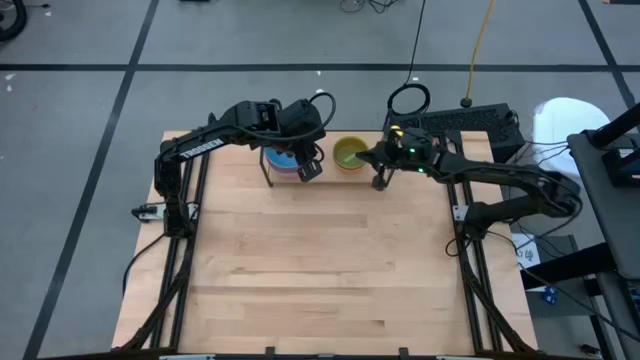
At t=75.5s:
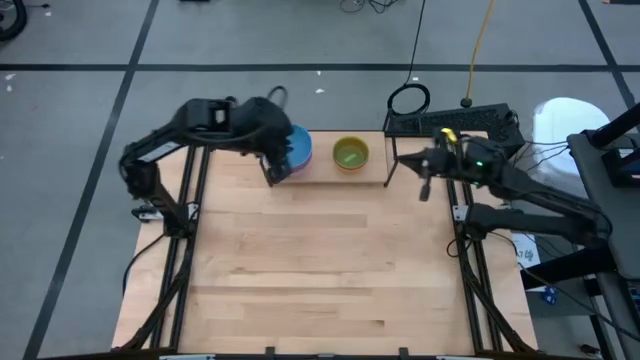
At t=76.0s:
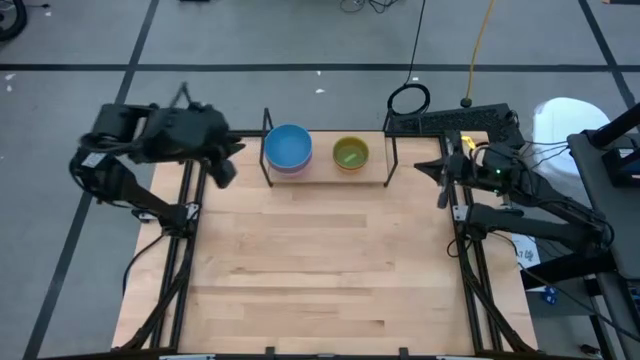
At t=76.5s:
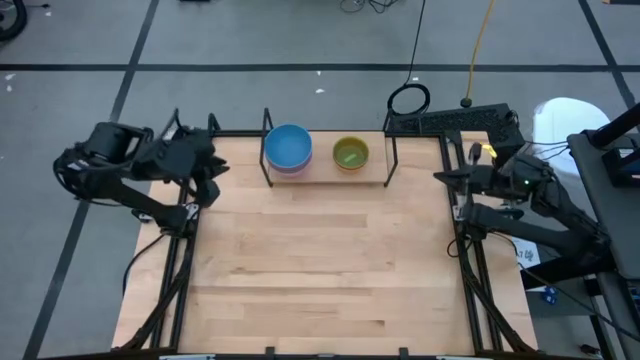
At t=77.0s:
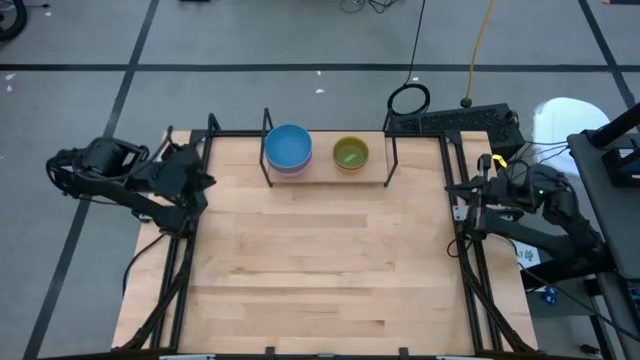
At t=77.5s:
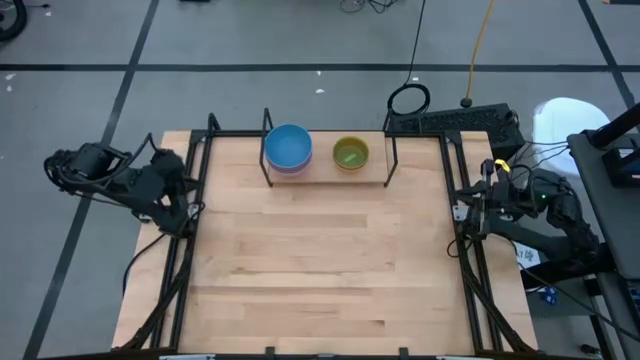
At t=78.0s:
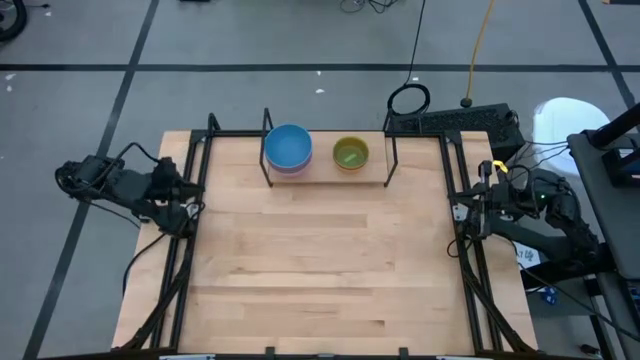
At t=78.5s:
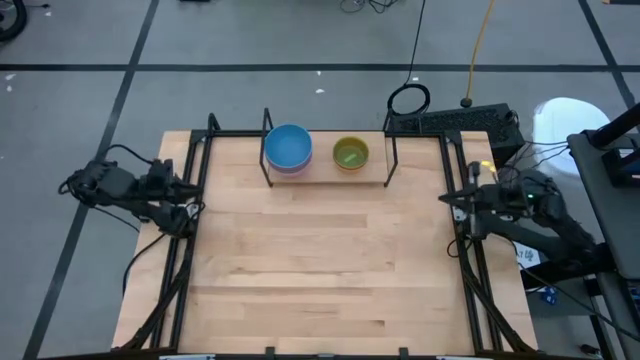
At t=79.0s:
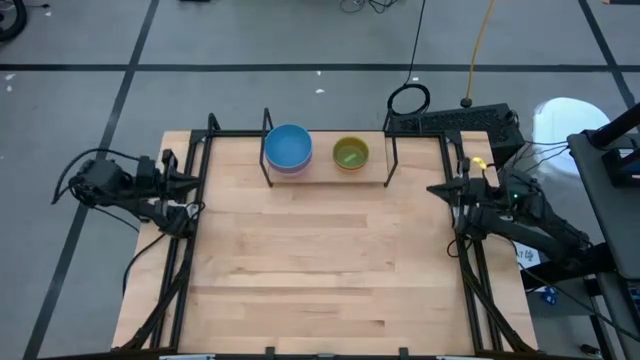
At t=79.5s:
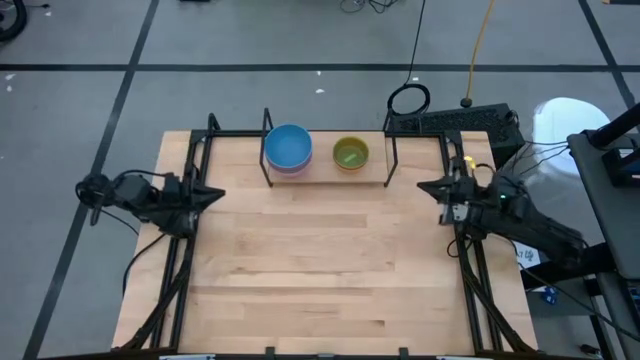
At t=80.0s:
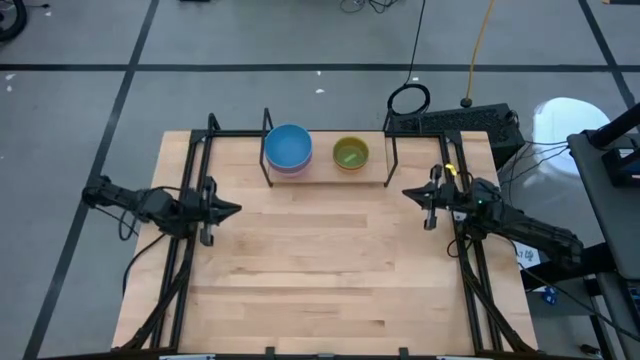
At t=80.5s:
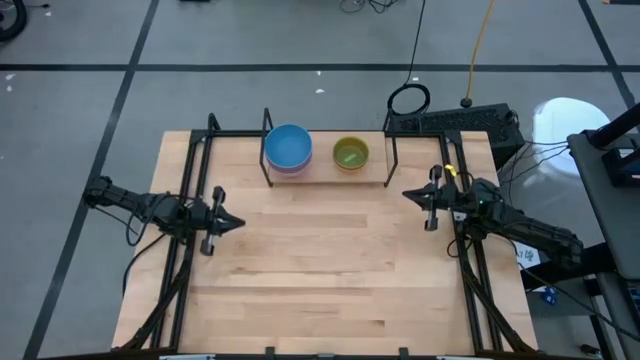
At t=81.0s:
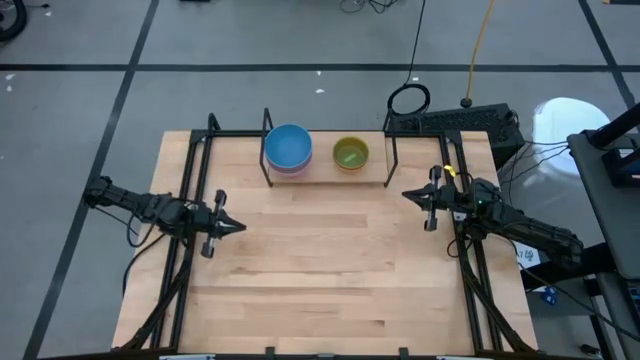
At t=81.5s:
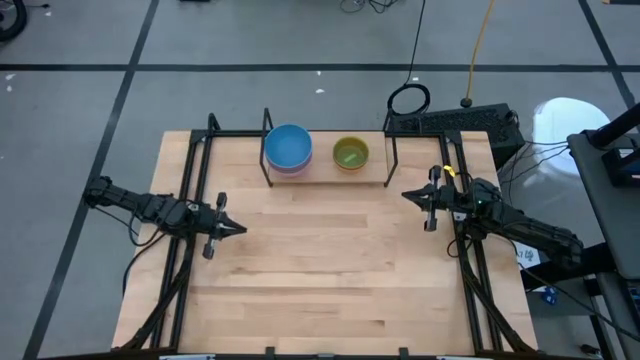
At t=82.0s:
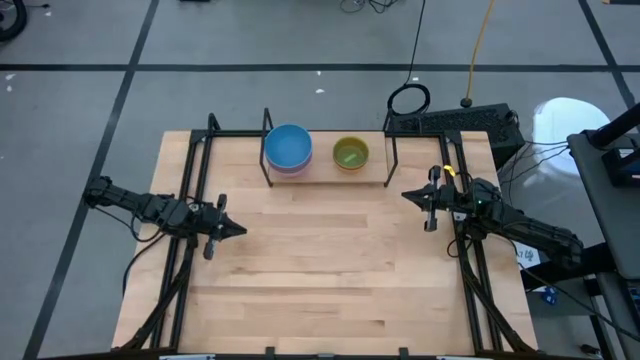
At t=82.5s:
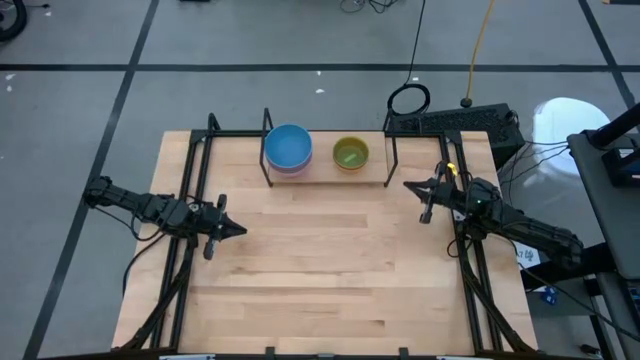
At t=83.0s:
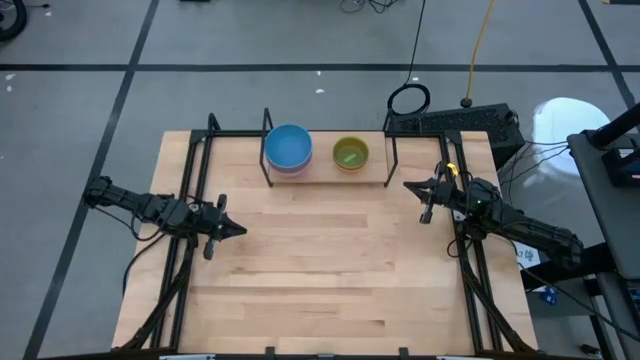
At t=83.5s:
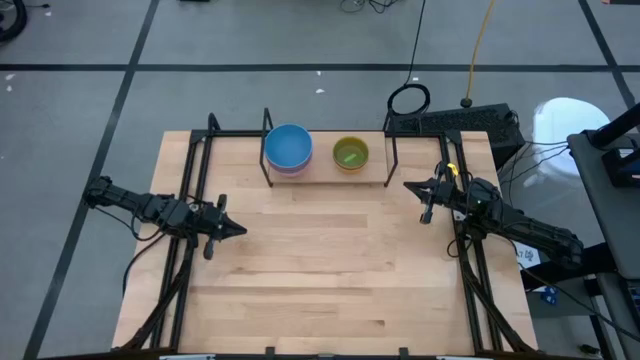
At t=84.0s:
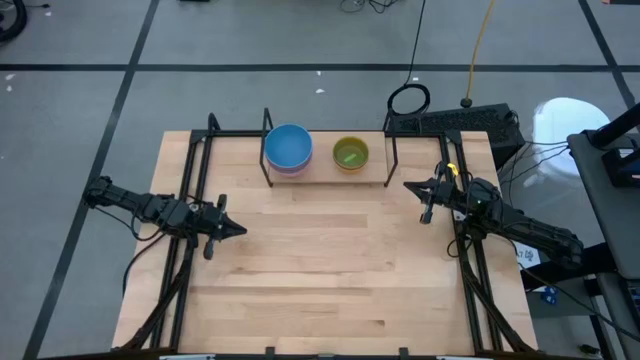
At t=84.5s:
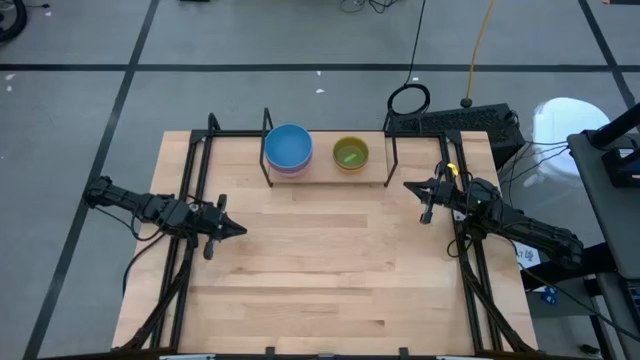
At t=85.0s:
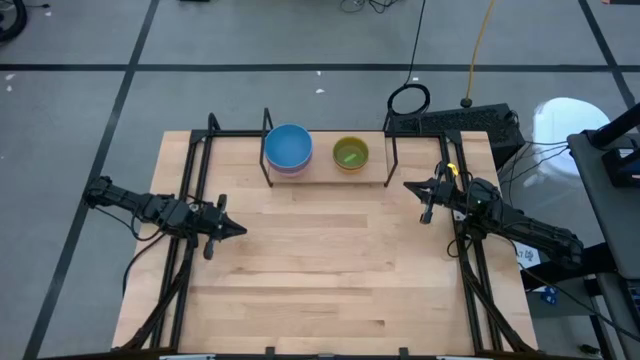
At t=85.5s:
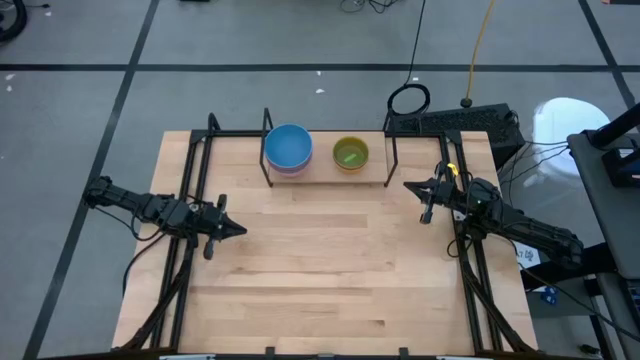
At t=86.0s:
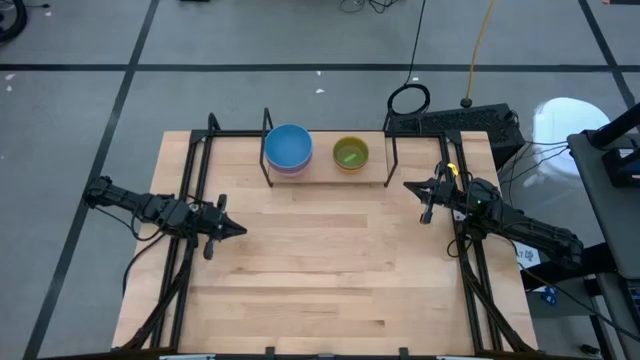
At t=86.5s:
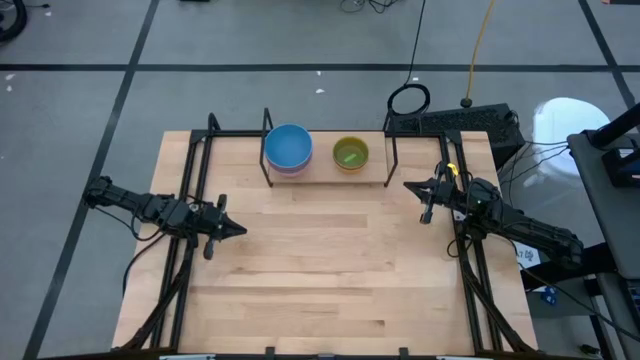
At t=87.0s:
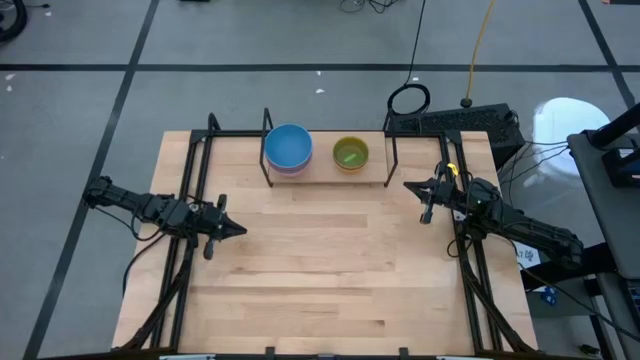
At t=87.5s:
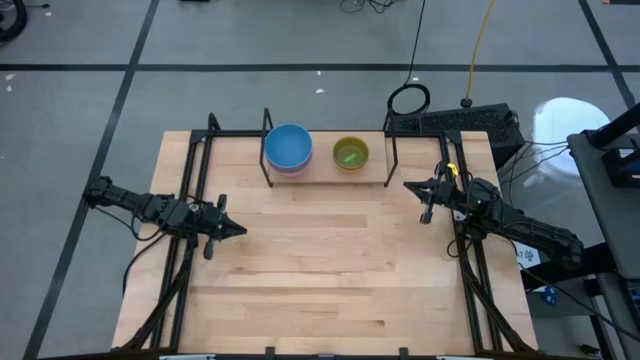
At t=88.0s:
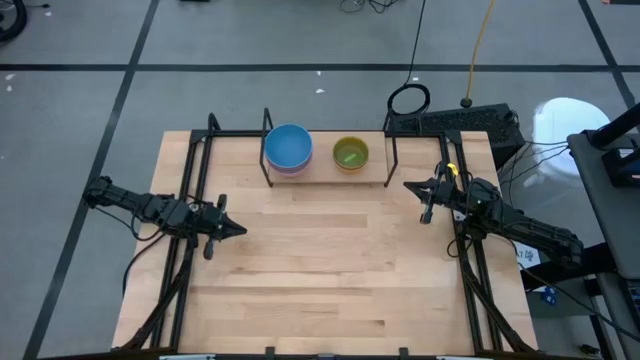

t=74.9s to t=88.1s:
Task: Place and stack bowls onto a shelf
Return to Home Position

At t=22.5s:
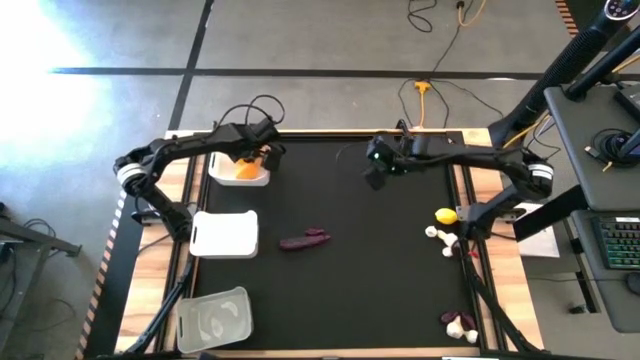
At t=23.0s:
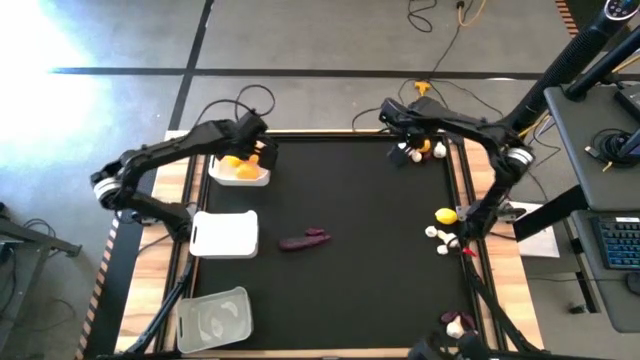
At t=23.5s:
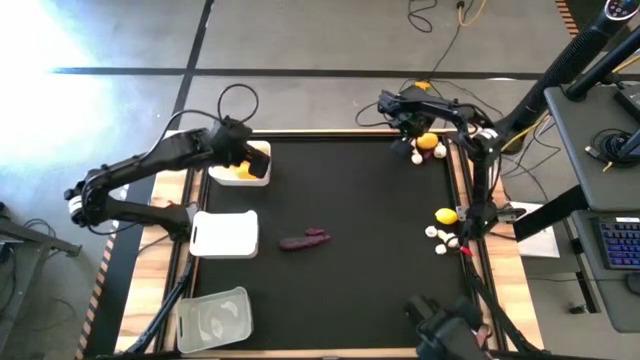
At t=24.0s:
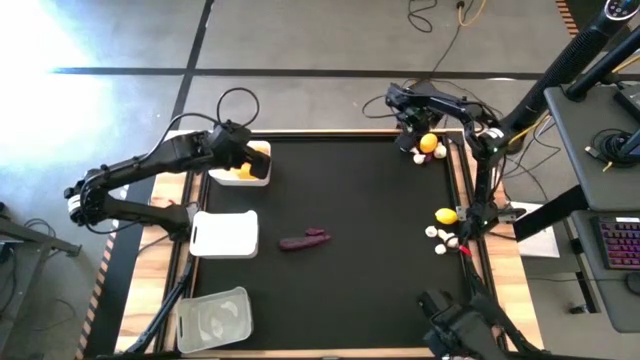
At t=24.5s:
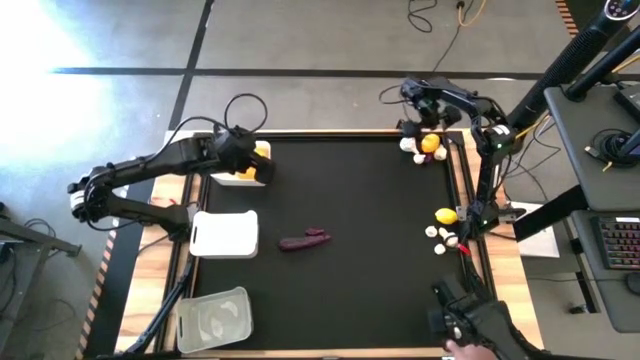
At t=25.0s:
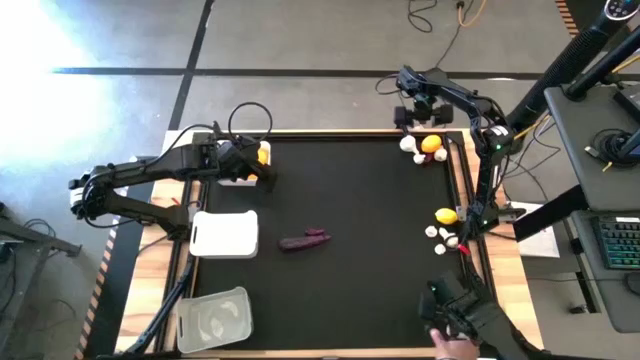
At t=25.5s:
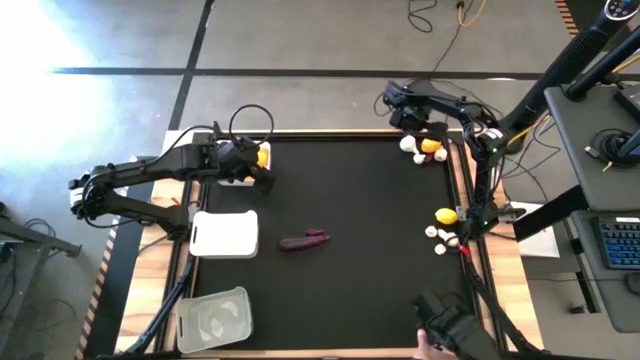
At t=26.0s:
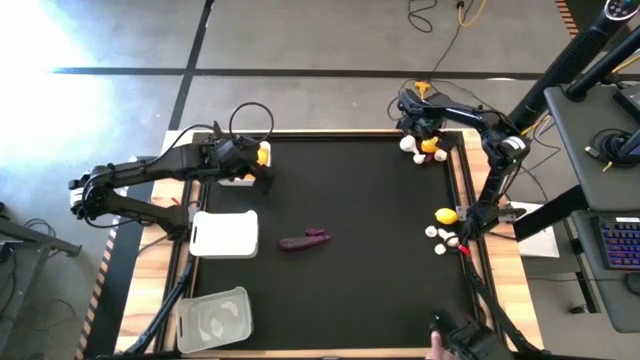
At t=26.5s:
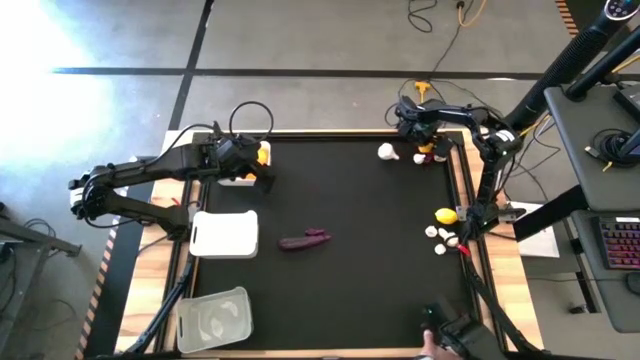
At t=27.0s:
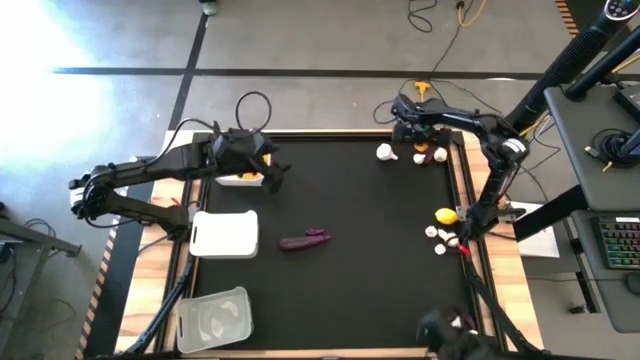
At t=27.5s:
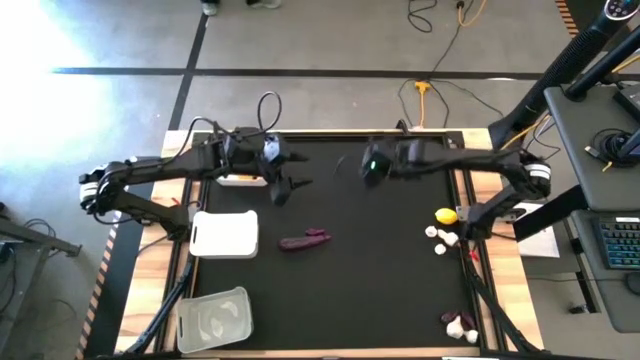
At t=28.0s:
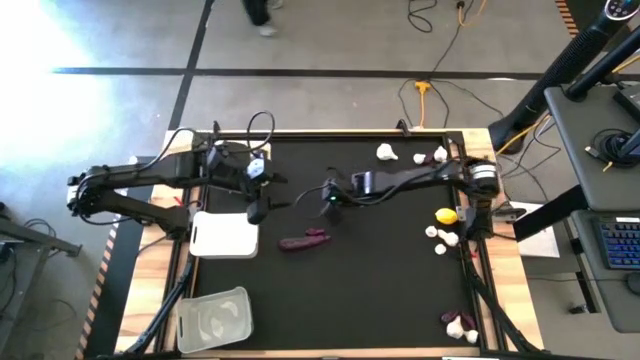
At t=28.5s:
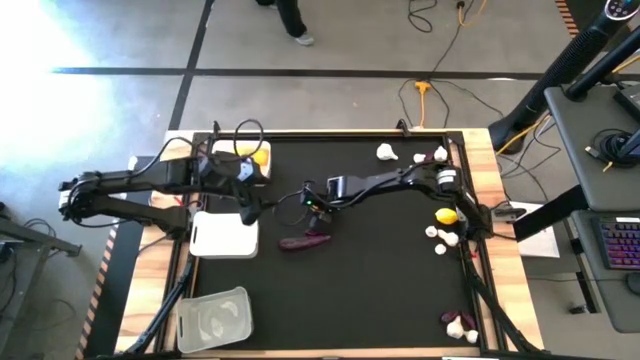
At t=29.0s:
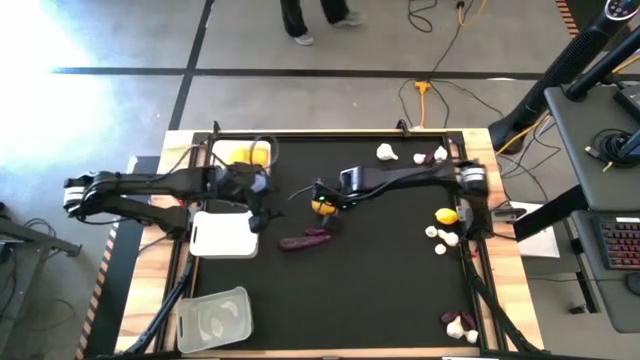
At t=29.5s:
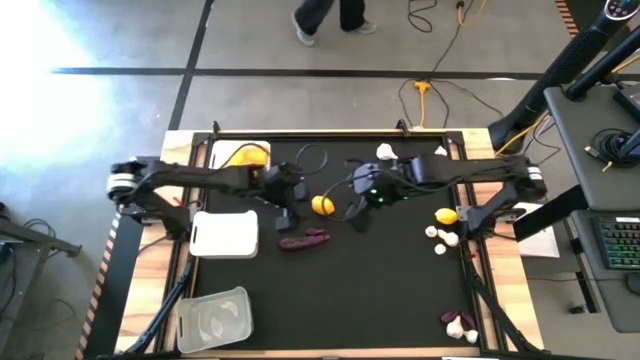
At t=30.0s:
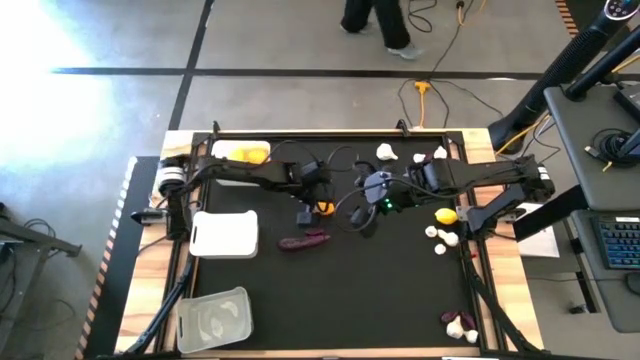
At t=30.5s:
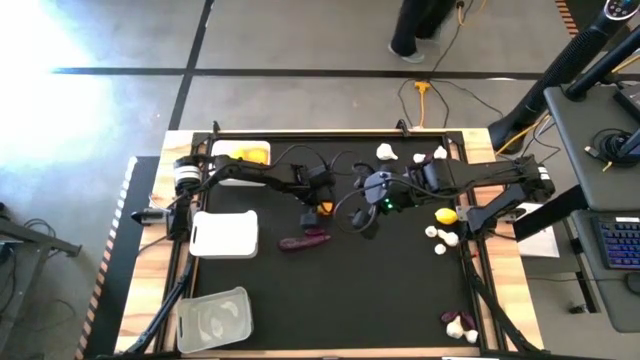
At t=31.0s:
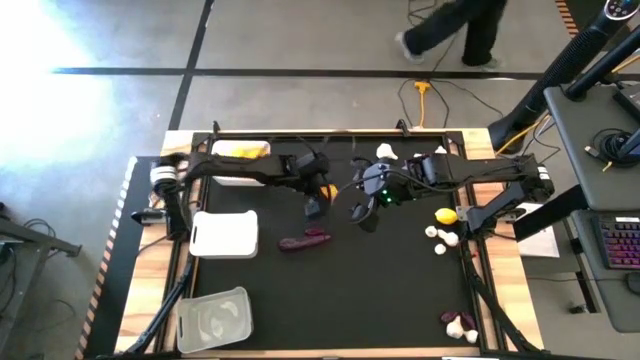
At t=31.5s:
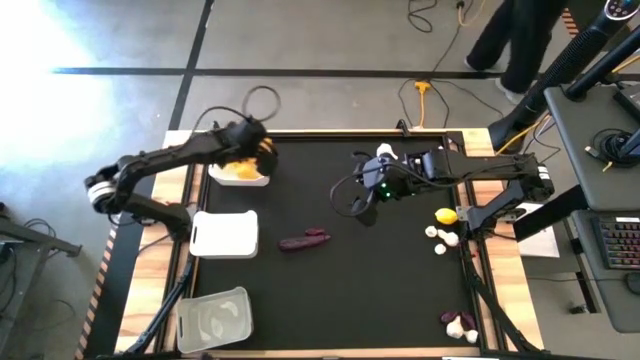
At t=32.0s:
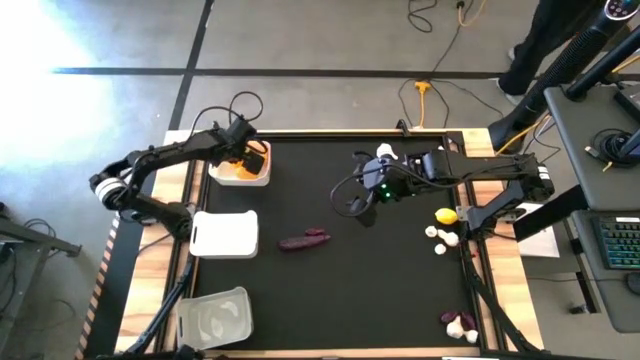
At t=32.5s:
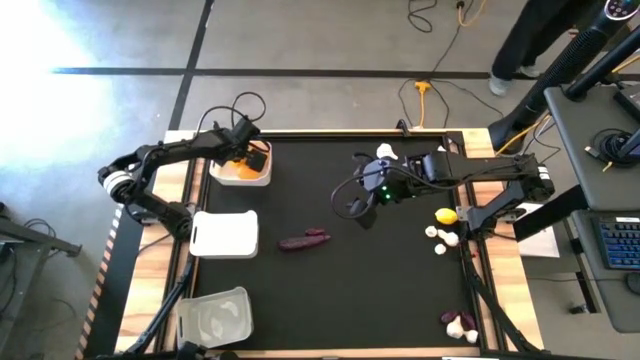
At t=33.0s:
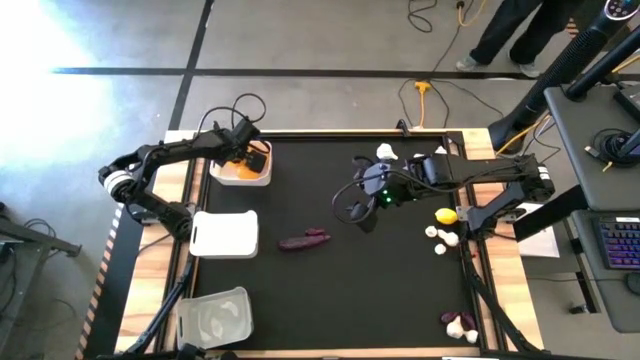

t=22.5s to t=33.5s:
Task: Sort produce into baskets
Put the lemon into the top white bin
